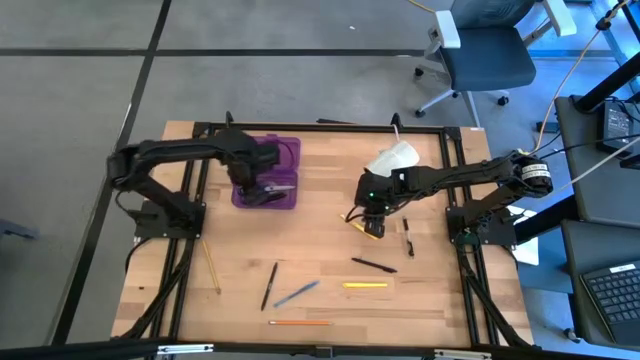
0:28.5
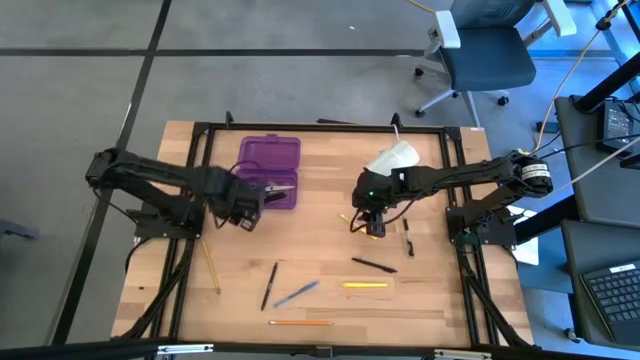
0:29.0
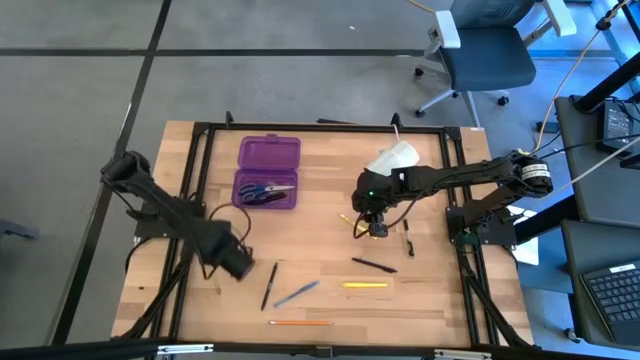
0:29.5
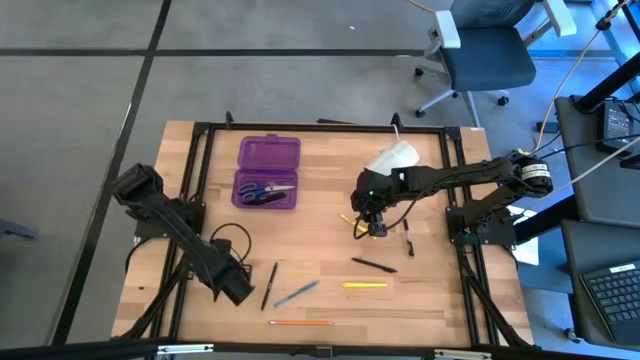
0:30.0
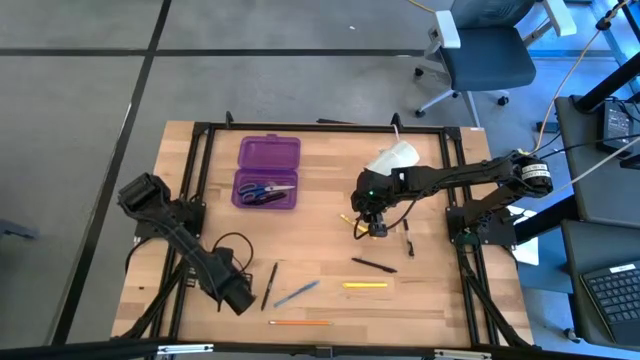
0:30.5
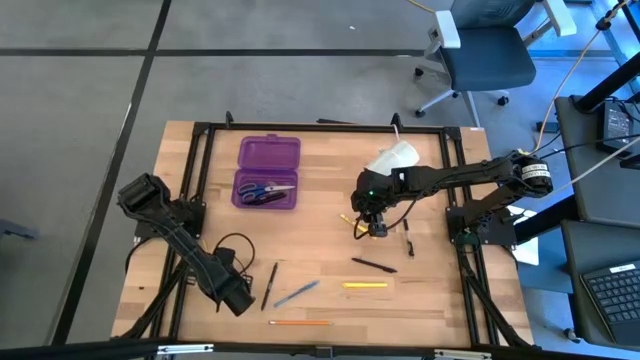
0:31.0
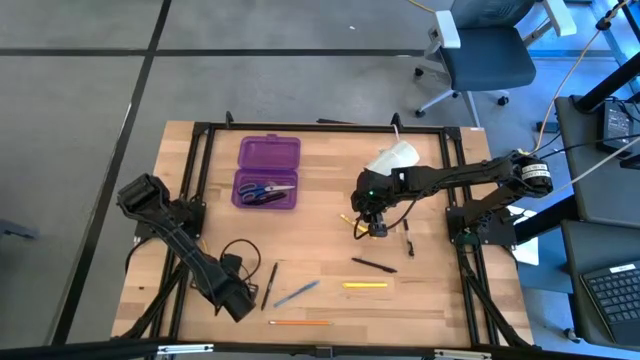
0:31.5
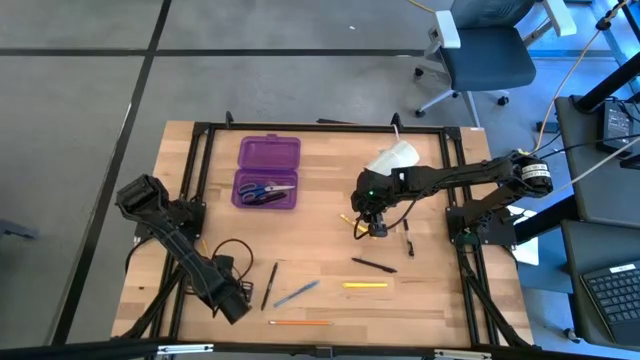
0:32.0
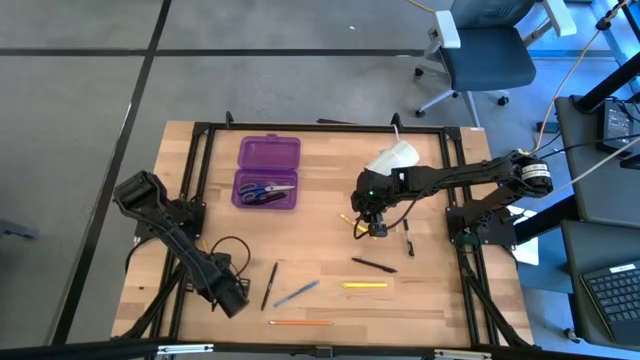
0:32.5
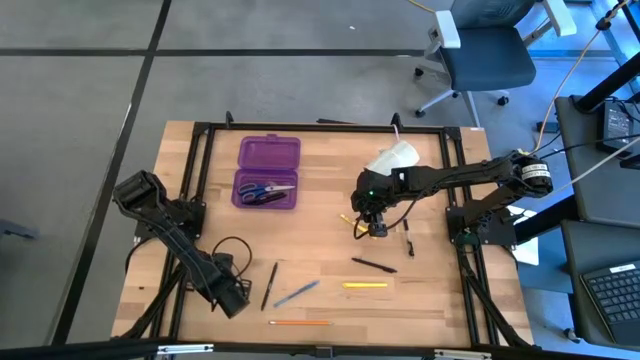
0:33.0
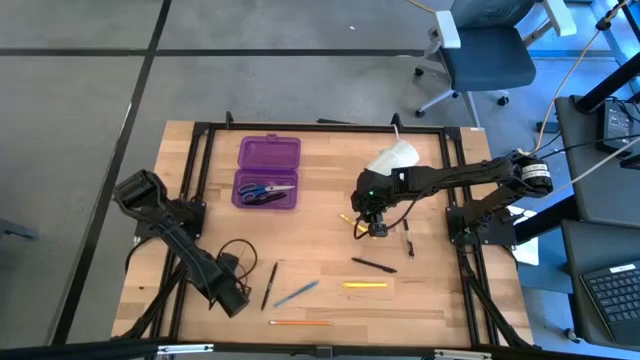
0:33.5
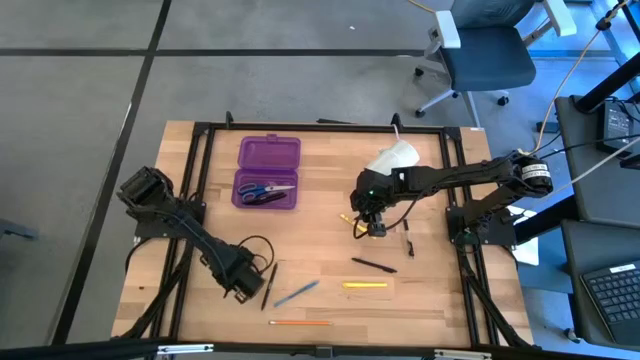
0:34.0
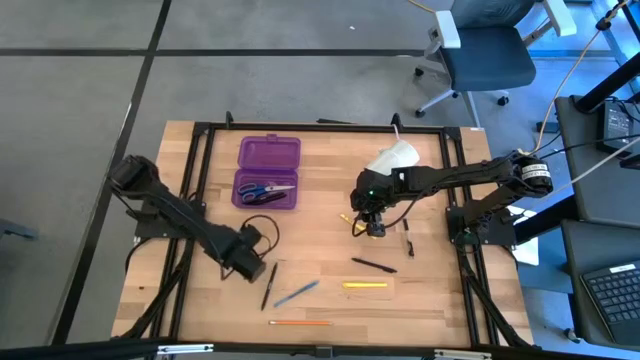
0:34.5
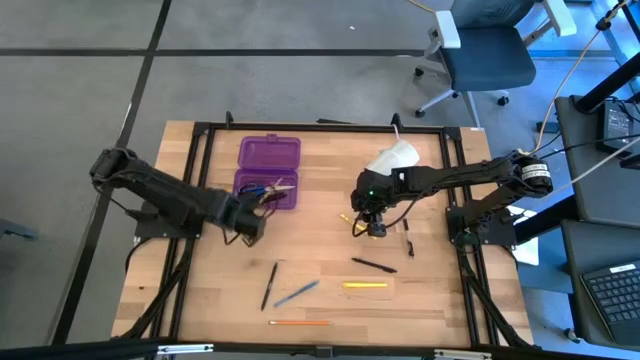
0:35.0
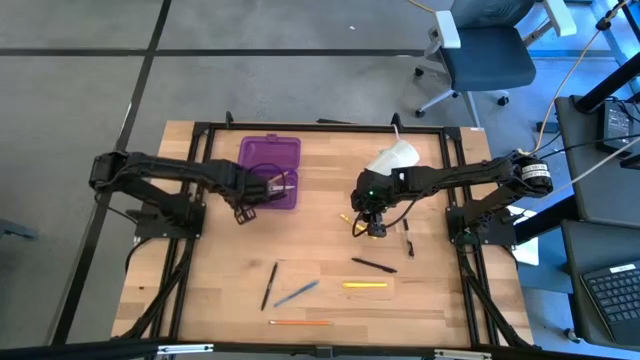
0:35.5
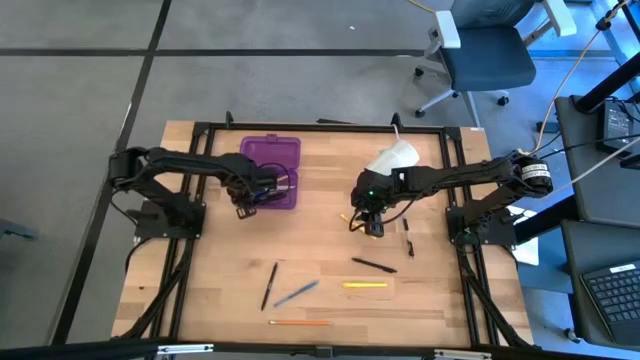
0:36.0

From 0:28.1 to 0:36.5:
Task: Pick & place school supplies into a supply box
Put the yellow pencil into the purple box organizer

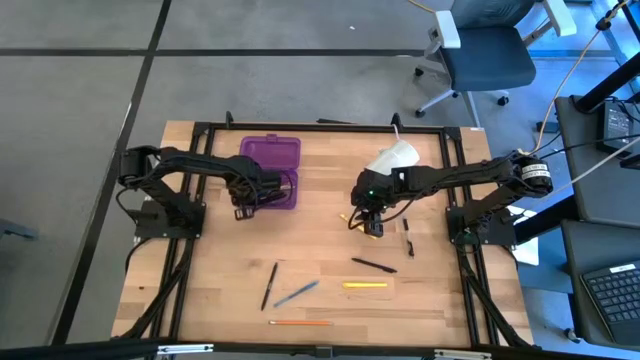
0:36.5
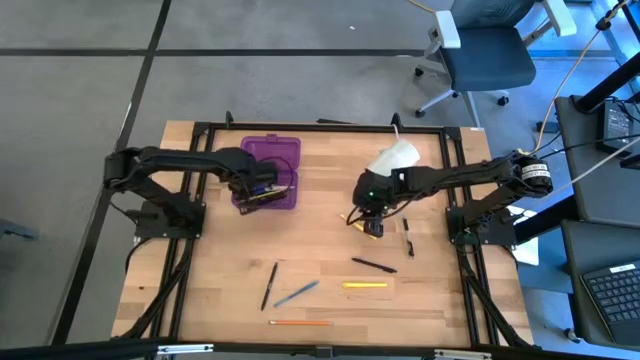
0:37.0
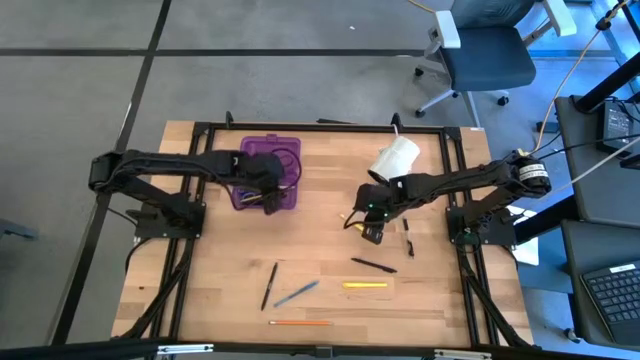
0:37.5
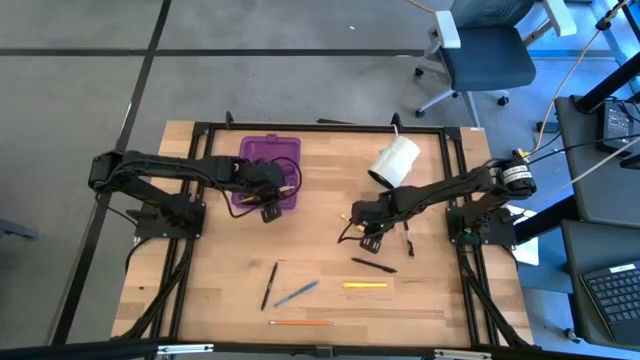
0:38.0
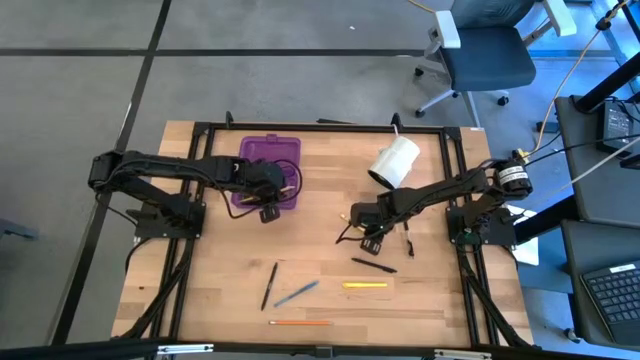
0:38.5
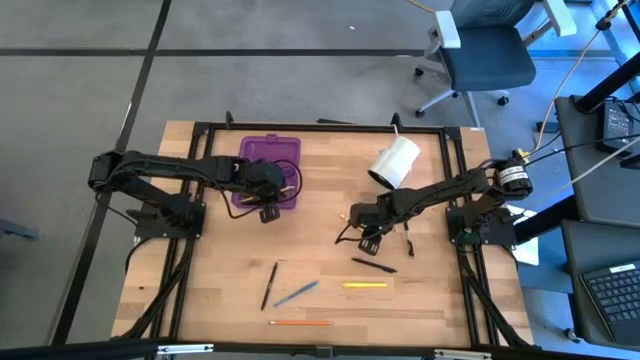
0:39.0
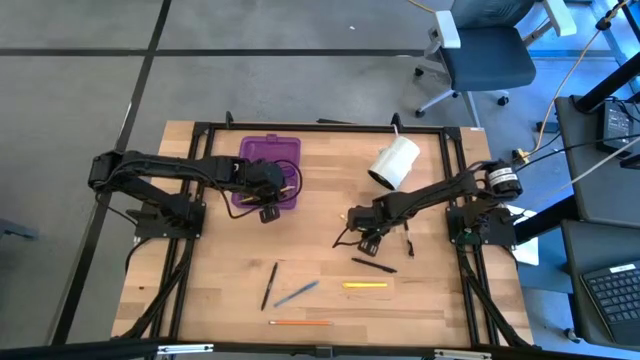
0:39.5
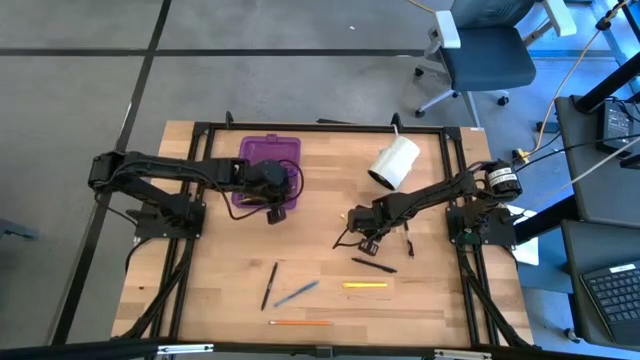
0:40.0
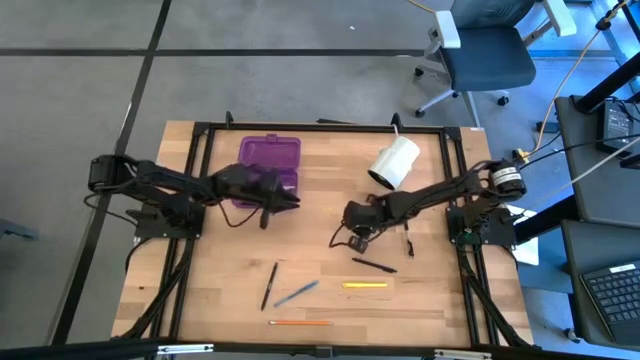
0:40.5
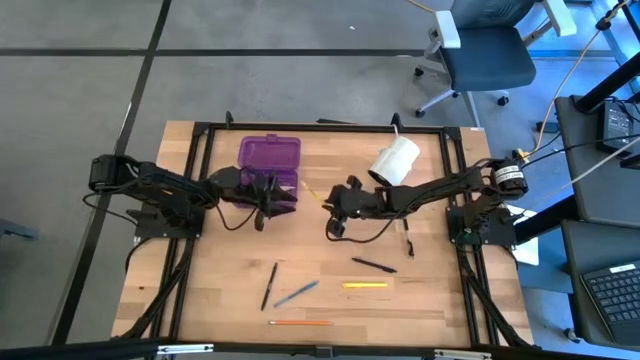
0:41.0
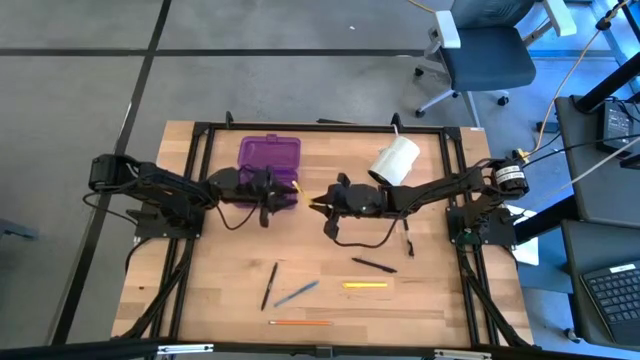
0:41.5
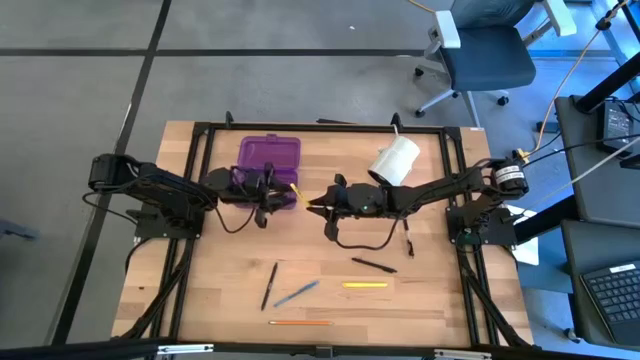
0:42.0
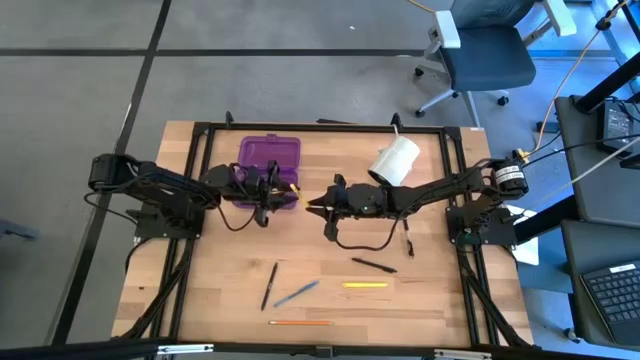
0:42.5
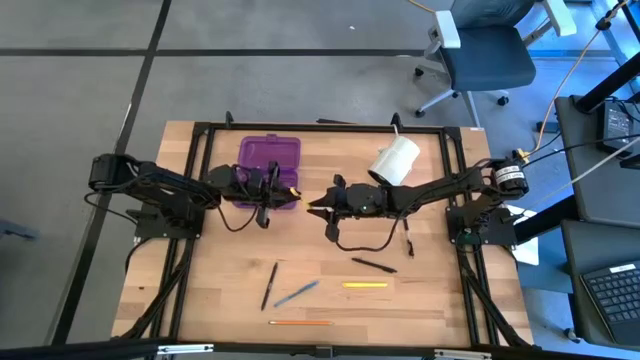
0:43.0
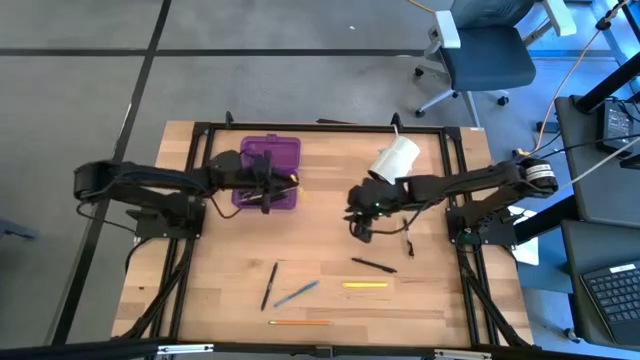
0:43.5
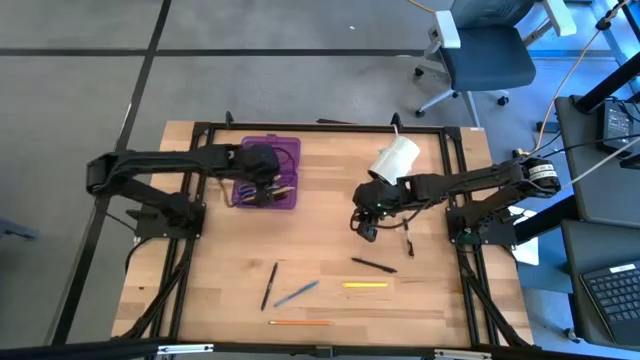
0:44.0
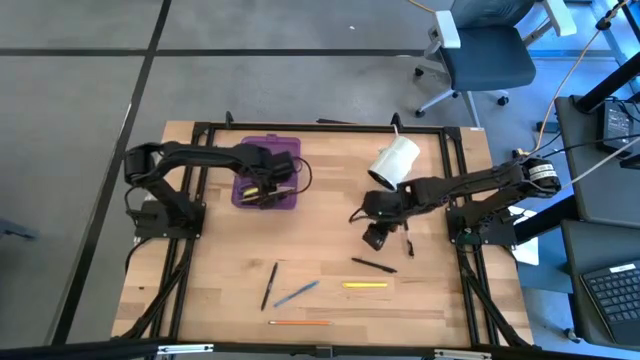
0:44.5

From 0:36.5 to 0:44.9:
Put the top yellow pen into the purple box organizer

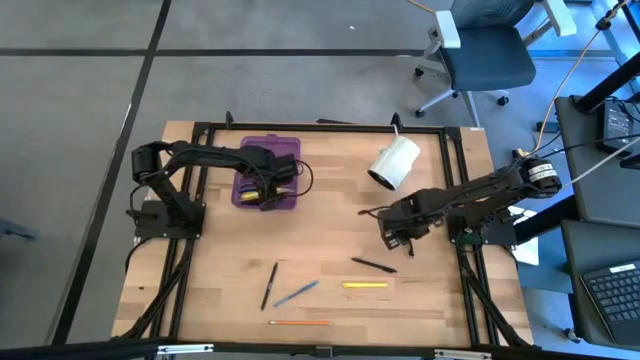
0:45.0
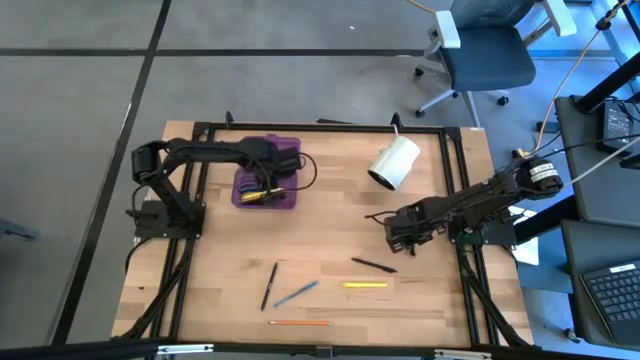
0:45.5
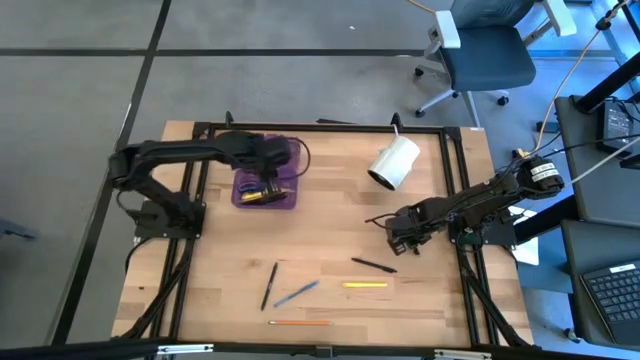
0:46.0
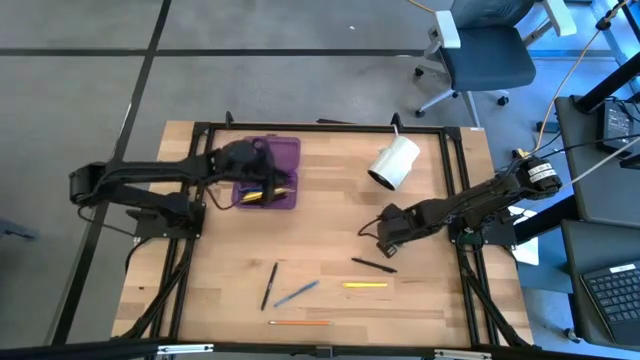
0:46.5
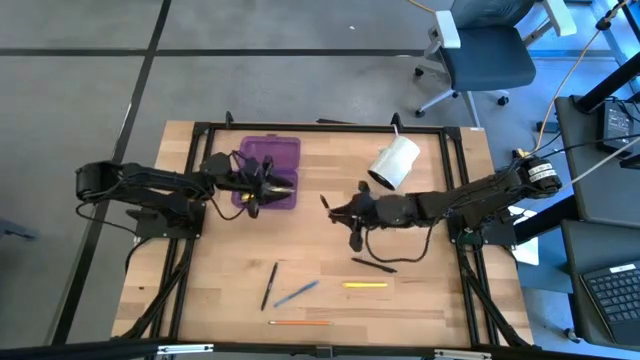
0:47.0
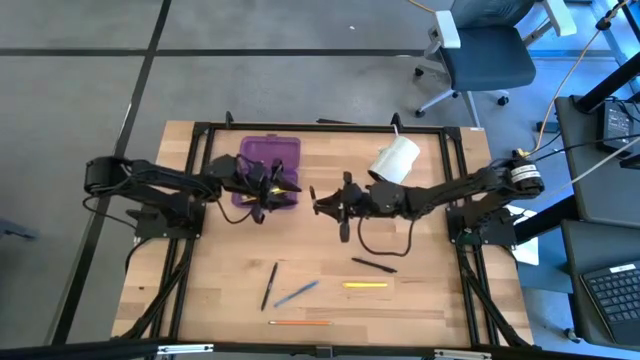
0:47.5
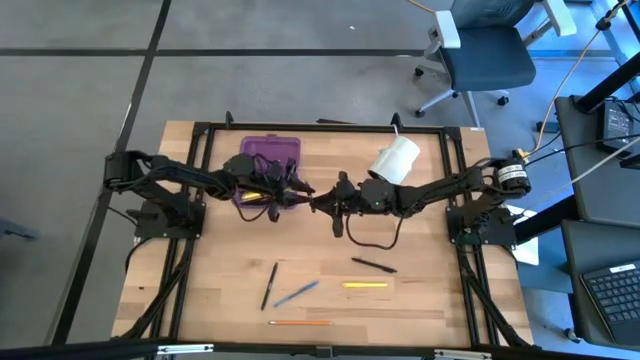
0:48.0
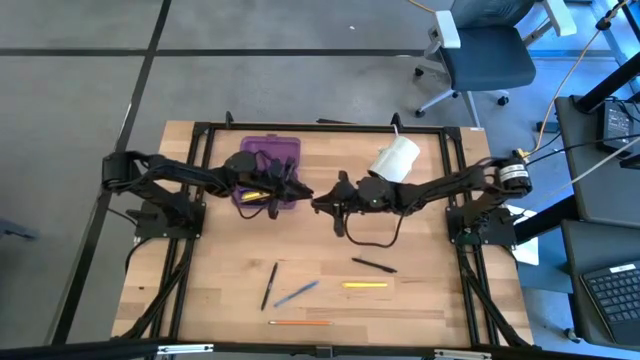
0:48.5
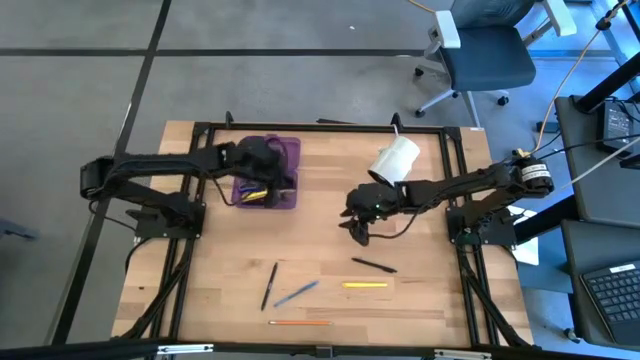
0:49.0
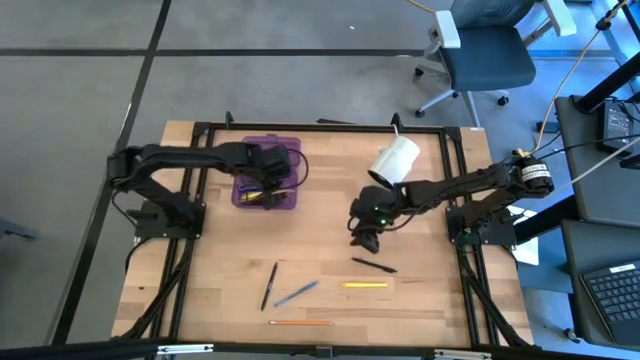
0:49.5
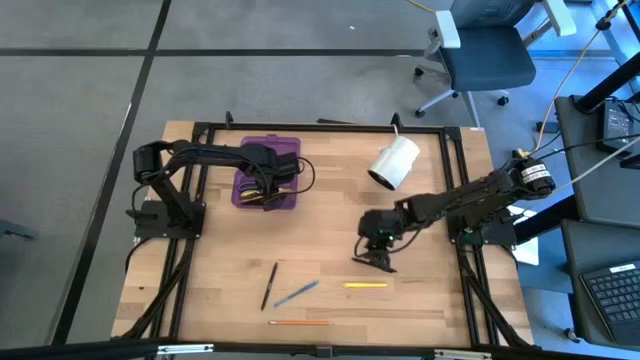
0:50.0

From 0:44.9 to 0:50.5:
Put the gray pen into purple box organizer
